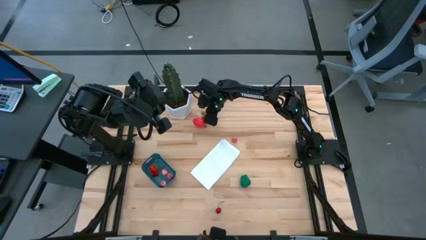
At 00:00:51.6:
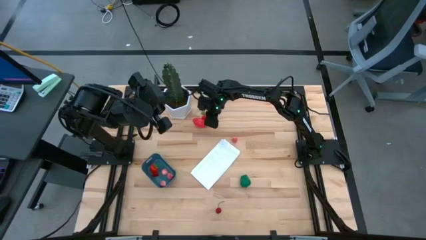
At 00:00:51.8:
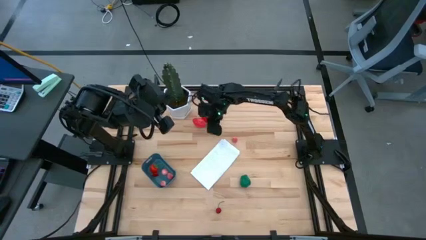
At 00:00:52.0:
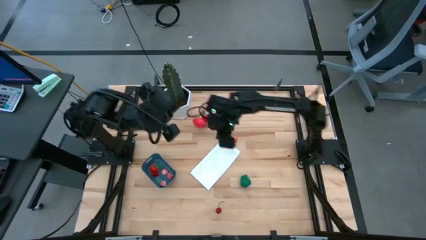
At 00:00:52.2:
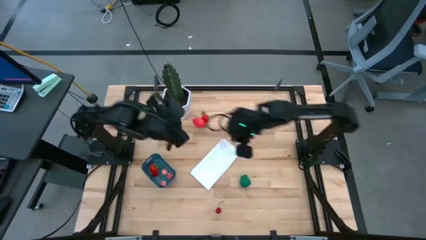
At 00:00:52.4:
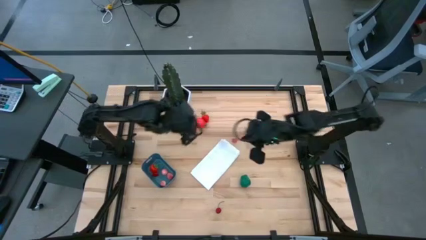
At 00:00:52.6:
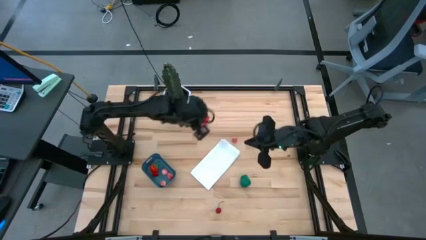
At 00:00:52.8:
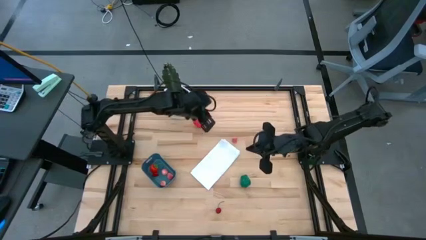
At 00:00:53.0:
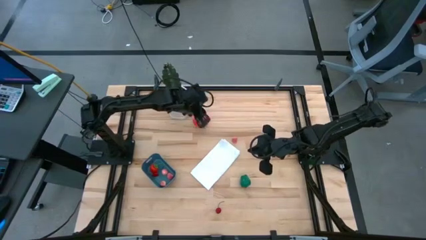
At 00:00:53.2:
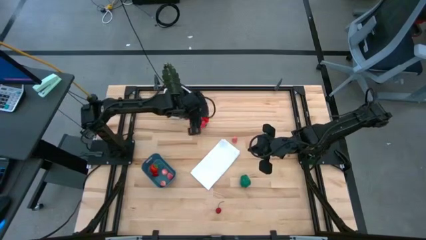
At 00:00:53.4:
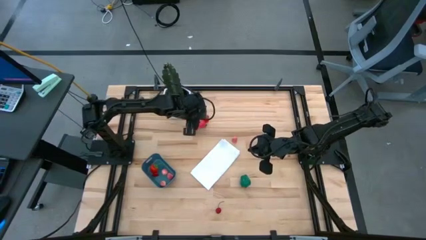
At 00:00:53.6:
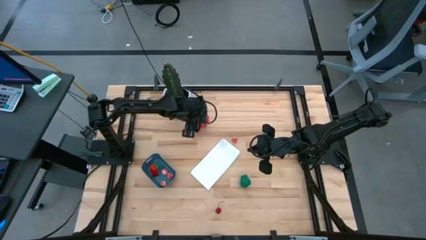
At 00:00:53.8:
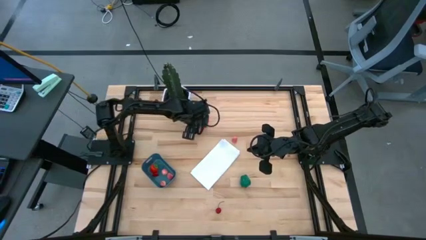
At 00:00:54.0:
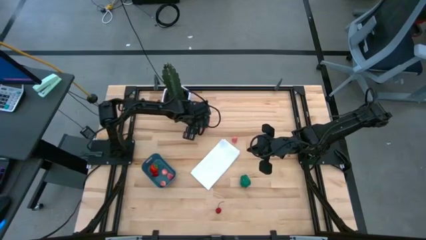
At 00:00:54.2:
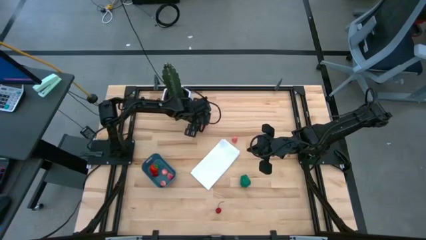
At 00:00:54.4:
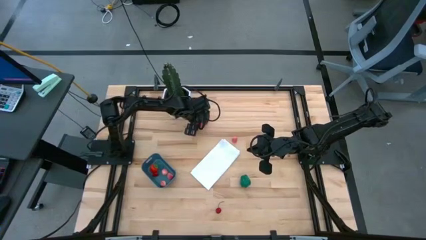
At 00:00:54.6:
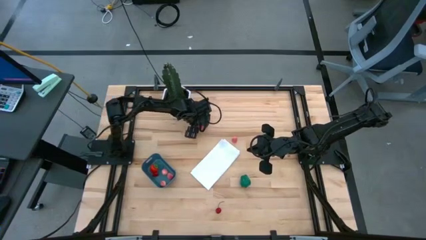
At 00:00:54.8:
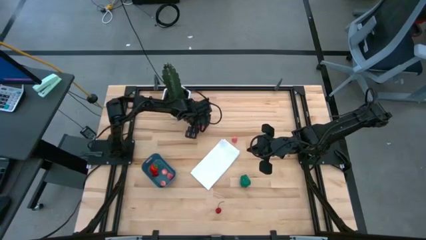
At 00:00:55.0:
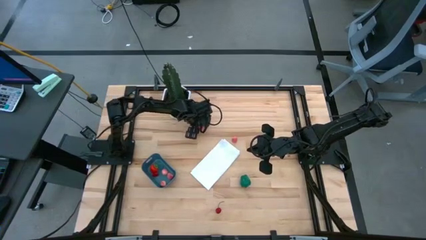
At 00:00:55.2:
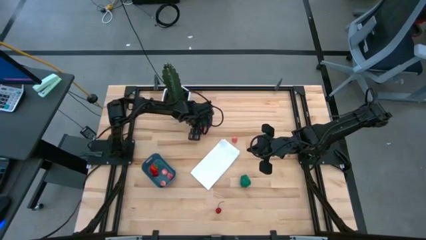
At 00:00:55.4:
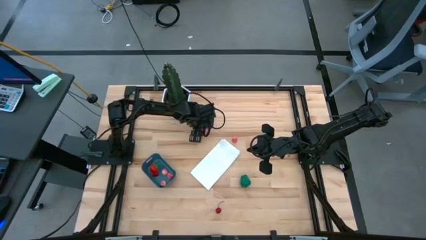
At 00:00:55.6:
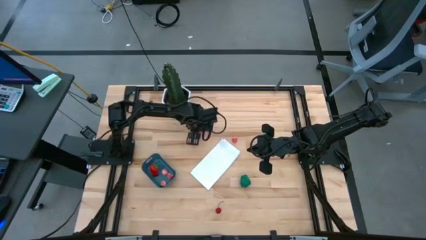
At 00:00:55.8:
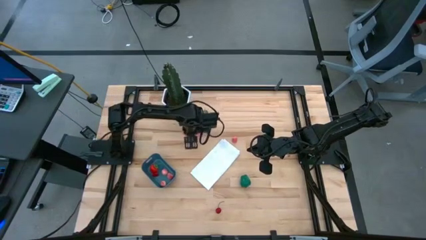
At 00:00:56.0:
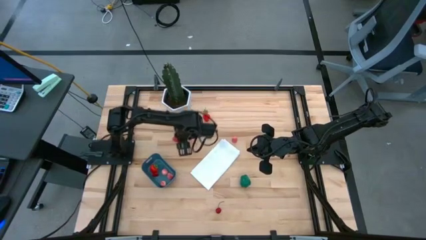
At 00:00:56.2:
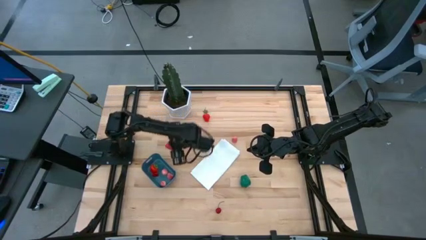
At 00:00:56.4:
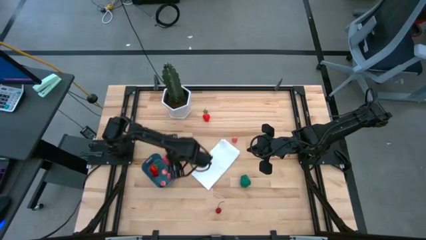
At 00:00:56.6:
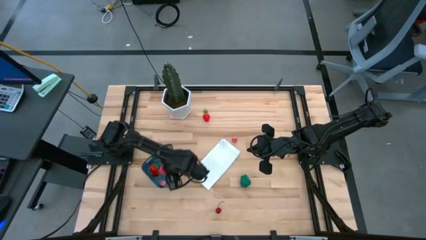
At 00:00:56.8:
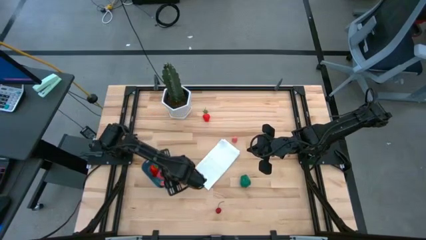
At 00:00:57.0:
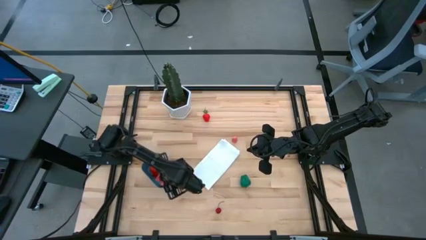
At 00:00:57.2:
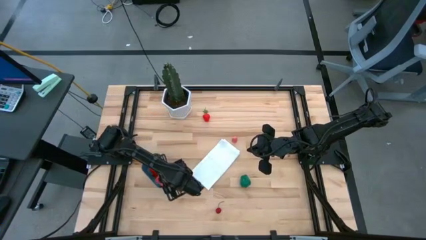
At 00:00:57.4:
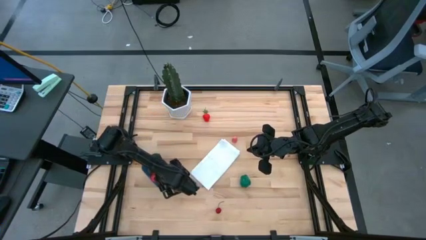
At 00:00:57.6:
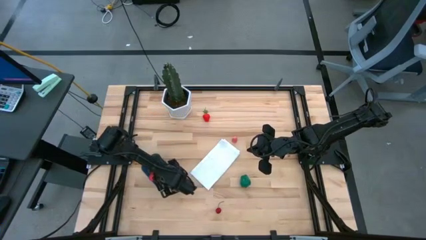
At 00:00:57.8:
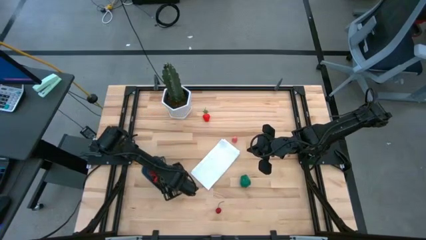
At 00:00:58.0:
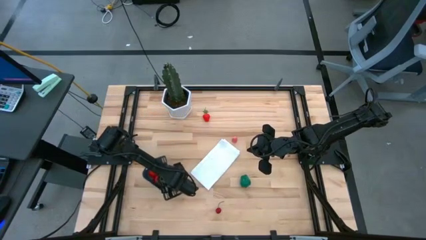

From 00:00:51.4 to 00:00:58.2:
Task: Pick and placing Produce into tupperware
Put the dragonfruit into the blue bin

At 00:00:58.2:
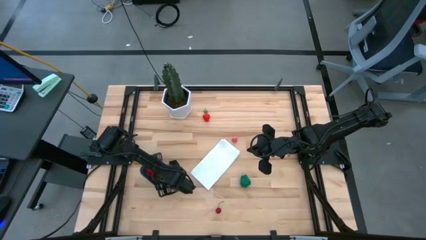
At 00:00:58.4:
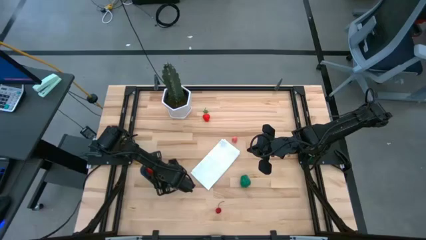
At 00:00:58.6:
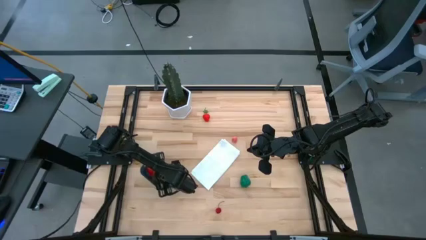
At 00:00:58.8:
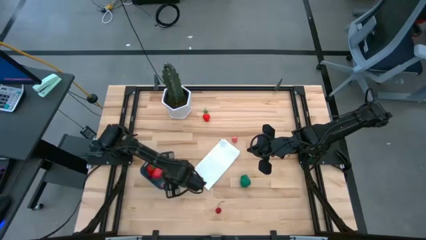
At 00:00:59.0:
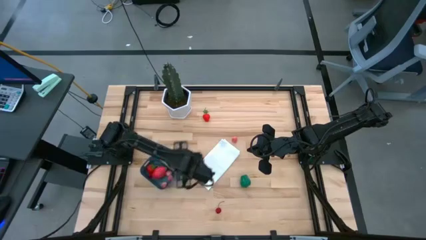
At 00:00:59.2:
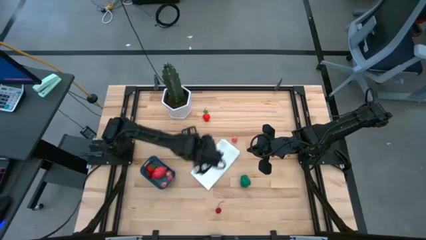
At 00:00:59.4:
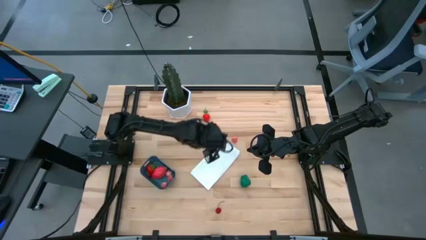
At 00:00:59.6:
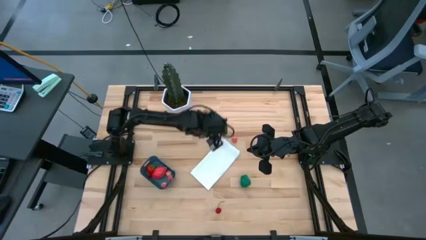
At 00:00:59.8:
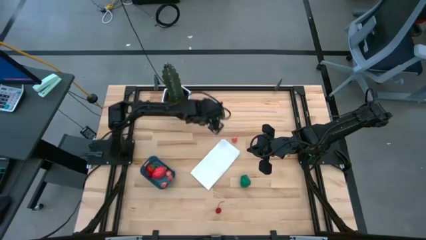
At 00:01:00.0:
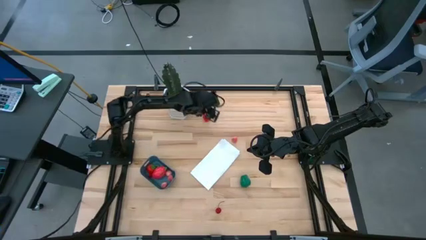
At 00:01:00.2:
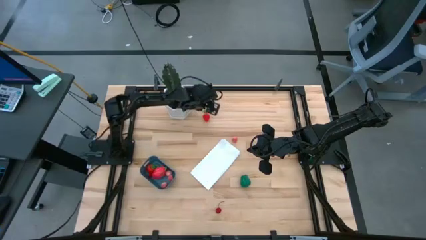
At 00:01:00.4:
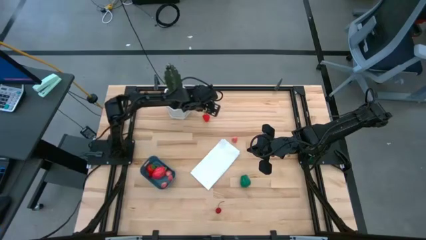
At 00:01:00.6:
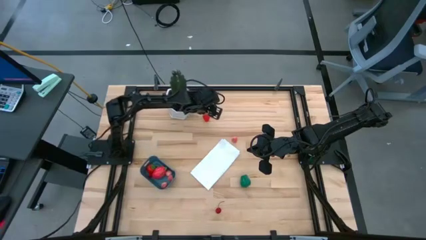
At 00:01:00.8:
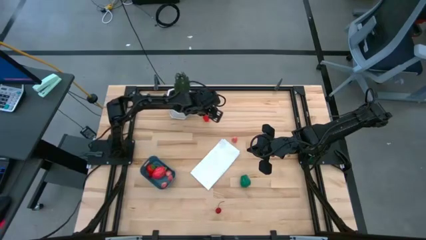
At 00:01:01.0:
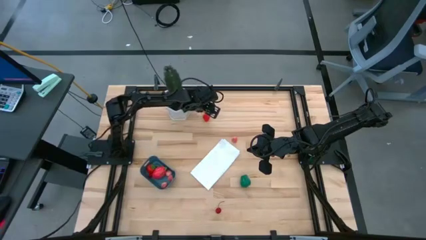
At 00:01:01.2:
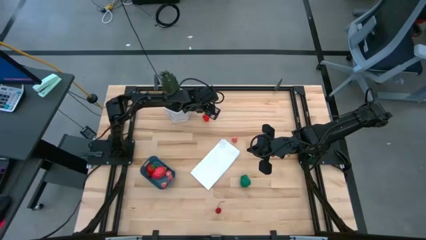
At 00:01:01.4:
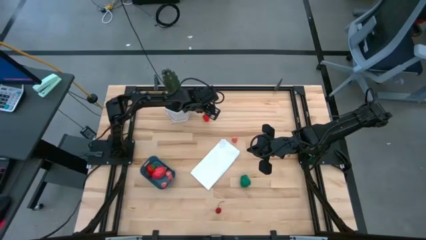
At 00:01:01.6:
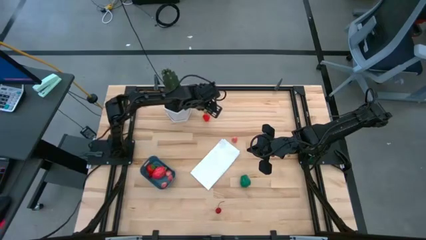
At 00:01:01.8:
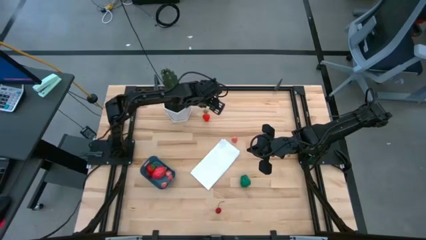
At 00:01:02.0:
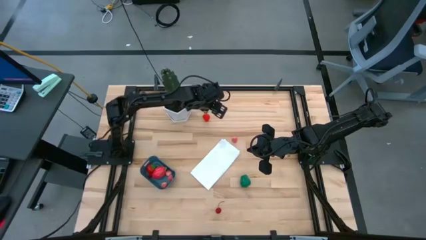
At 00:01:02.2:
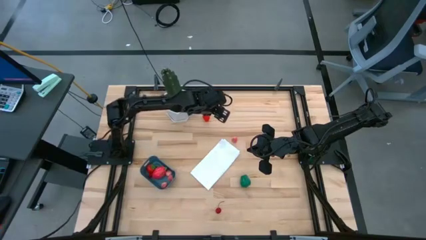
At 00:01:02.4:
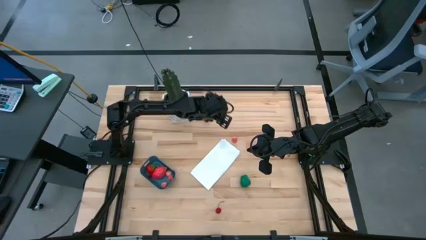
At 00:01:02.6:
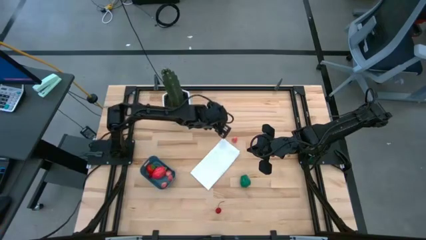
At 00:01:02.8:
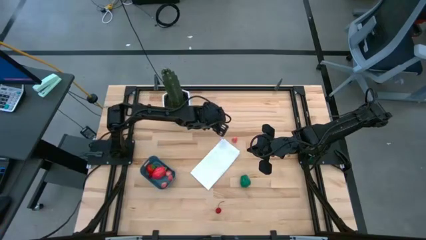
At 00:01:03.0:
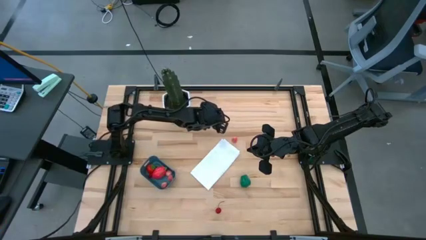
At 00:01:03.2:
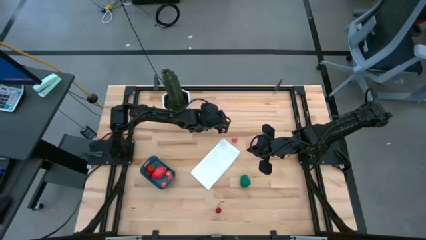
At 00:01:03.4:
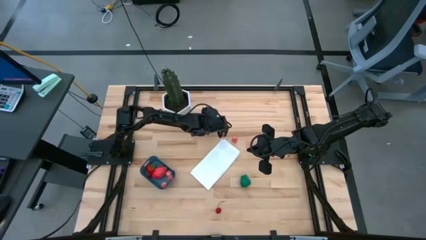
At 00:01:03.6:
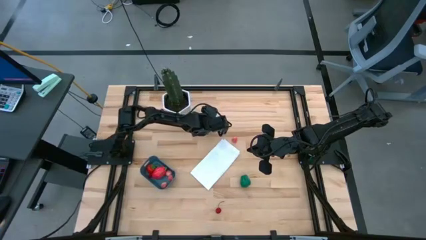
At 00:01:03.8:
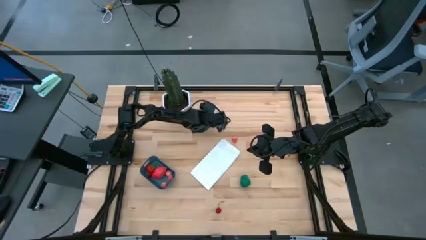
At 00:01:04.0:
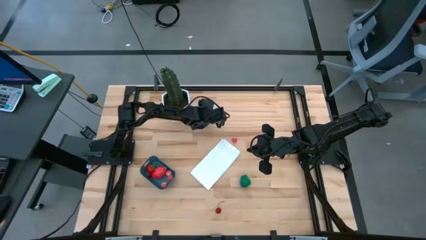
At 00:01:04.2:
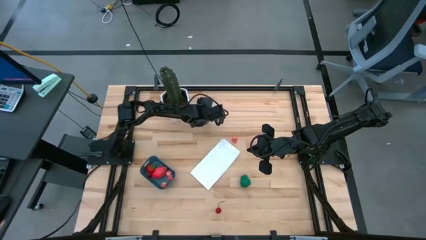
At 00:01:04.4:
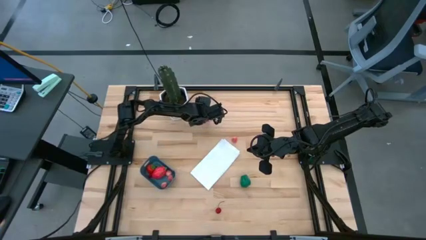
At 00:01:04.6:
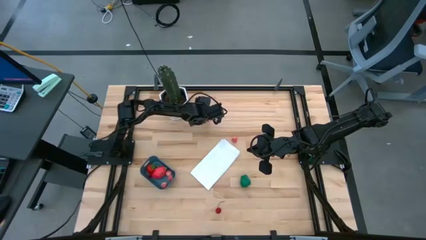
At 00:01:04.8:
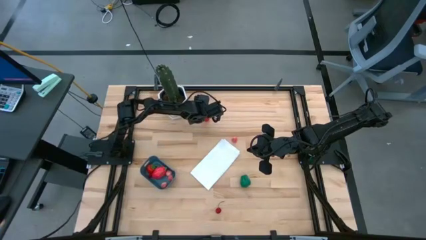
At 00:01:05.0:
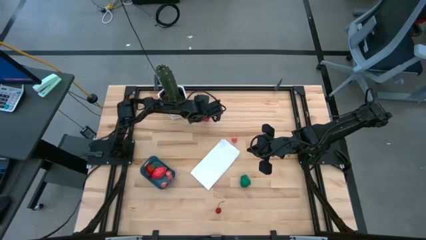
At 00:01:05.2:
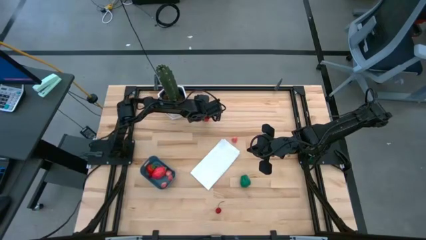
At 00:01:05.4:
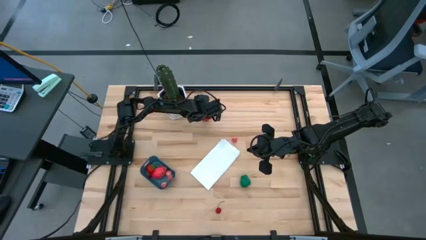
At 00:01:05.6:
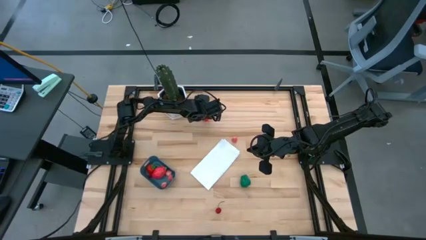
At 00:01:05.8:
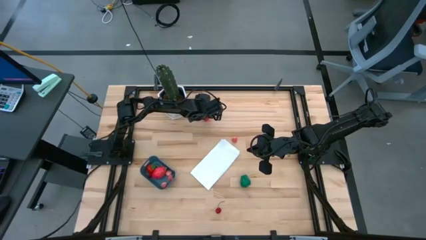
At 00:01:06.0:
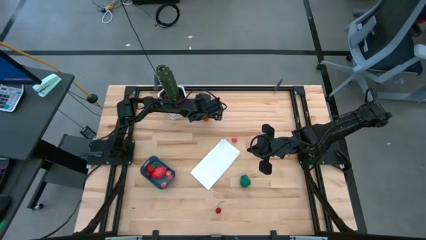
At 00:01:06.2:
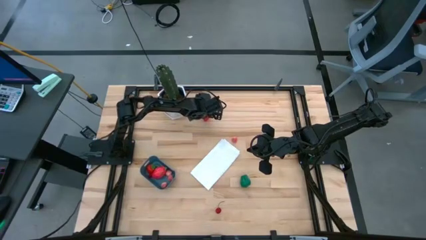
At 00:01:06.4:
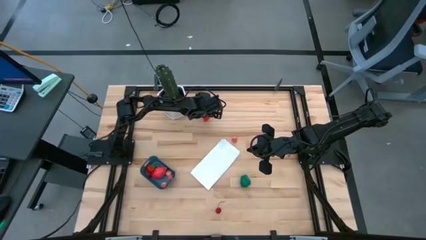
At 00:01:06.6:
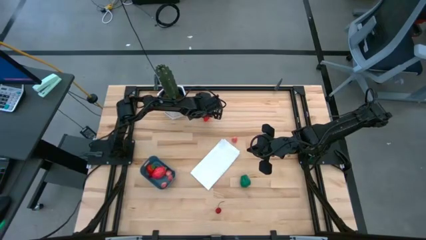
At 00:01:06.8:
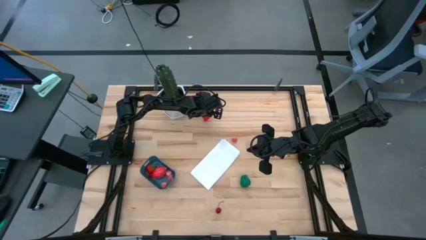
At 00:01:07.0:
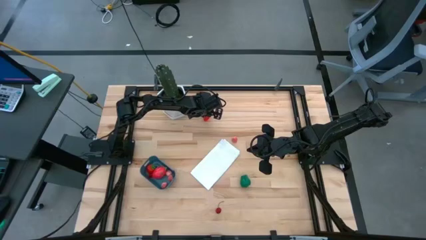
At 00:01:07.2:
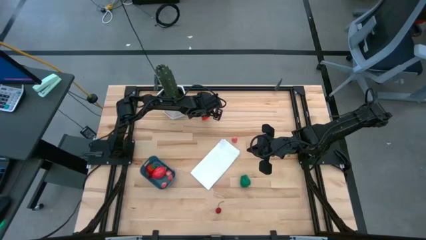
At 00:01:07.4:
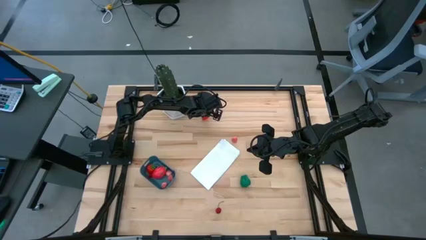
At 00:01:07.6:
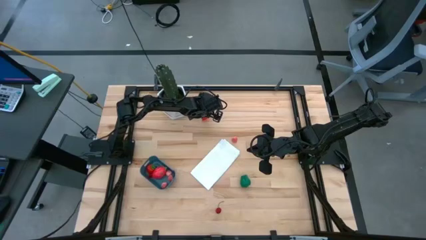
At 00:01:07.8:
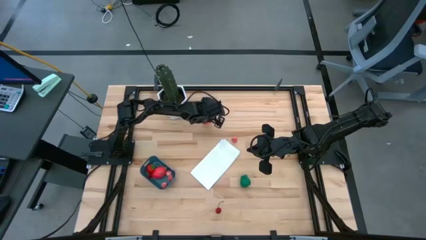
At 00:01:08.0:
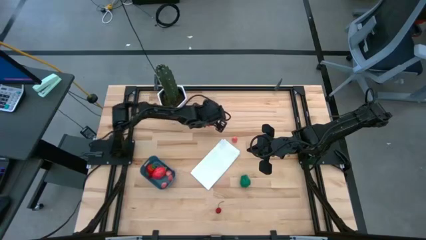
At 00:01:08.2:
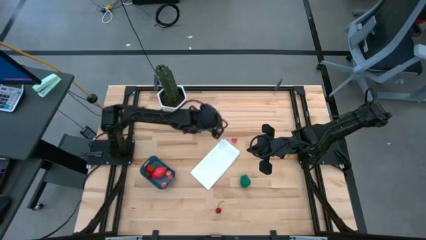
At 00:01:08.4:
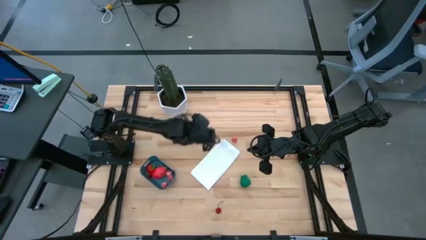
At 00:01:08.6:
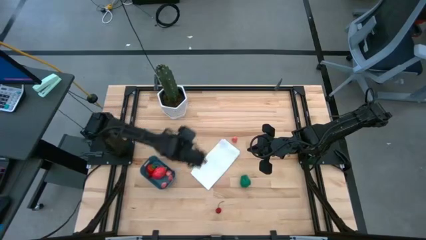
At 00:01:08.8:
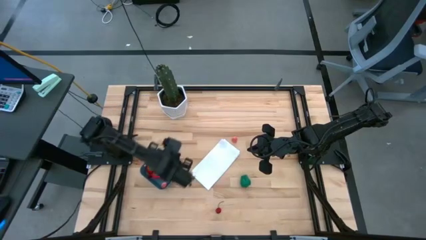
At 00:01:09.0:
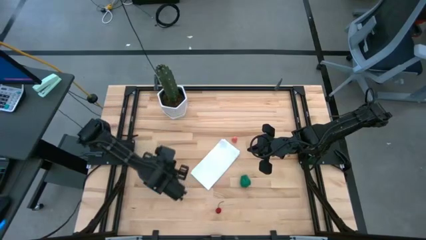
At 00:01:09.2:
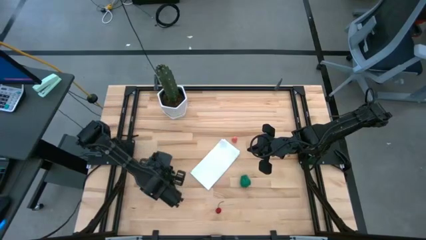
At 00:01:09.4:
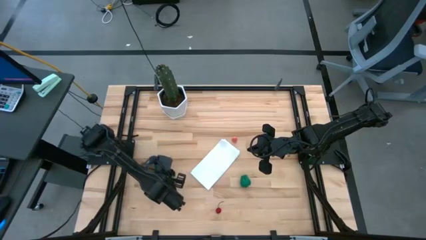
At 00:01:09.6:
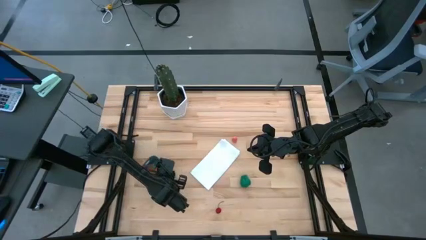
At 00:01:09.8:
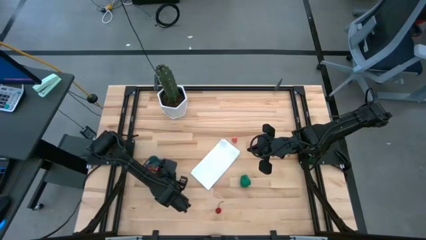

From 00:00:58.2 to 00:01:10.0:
Put the strawberry into the blue bin
